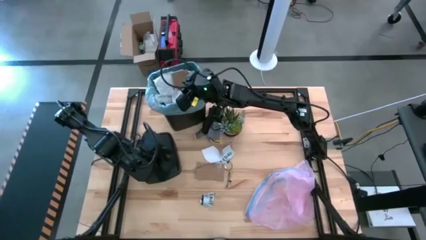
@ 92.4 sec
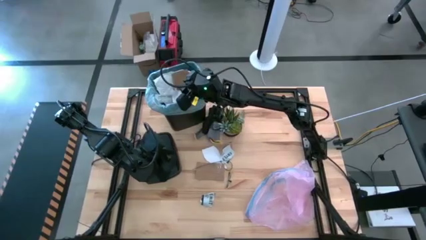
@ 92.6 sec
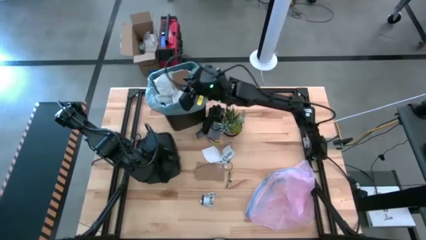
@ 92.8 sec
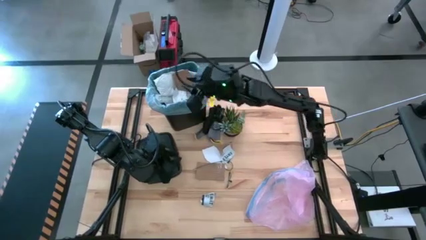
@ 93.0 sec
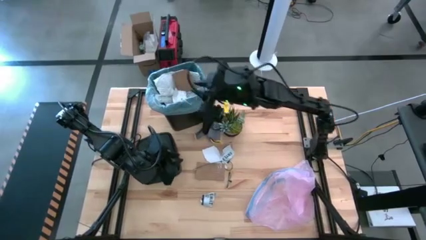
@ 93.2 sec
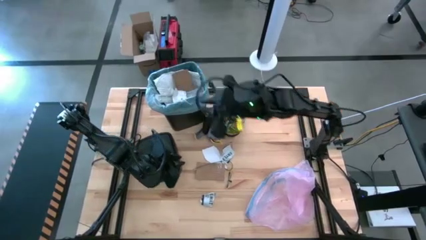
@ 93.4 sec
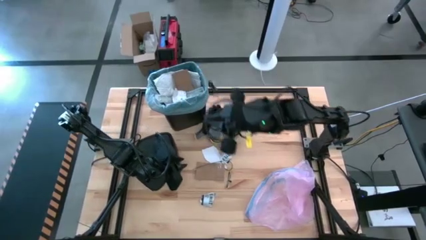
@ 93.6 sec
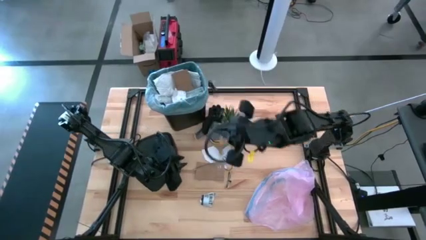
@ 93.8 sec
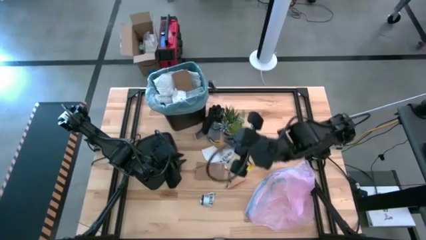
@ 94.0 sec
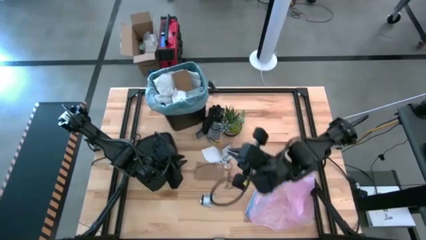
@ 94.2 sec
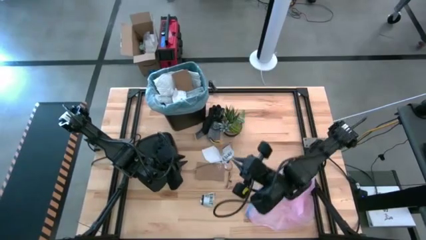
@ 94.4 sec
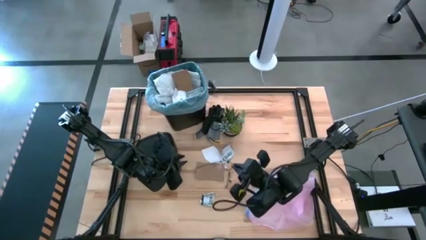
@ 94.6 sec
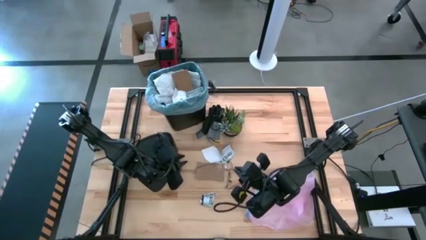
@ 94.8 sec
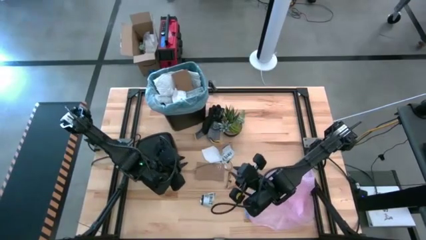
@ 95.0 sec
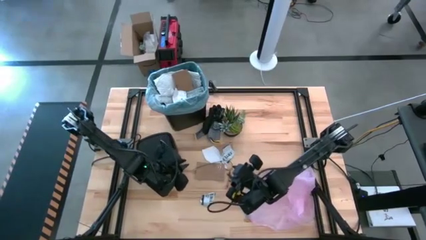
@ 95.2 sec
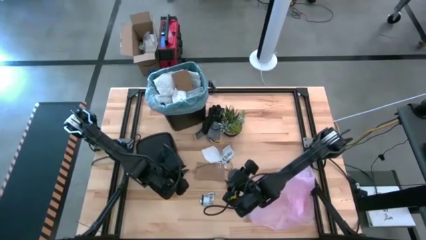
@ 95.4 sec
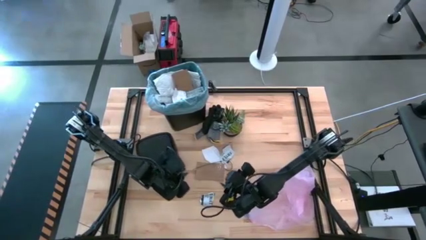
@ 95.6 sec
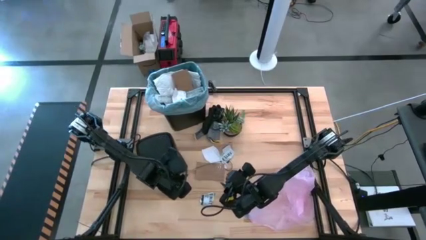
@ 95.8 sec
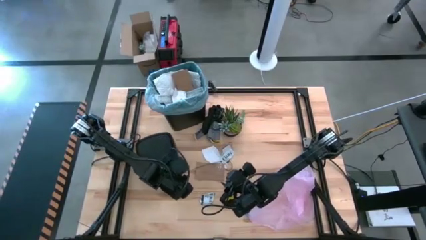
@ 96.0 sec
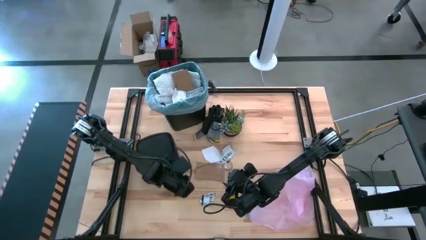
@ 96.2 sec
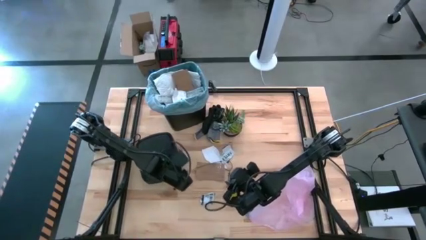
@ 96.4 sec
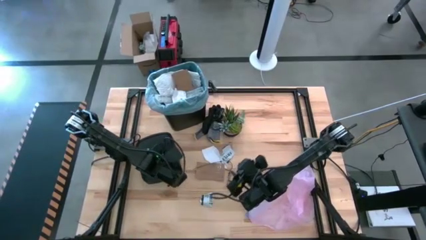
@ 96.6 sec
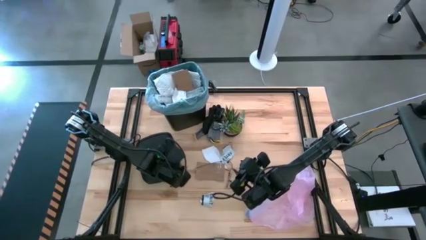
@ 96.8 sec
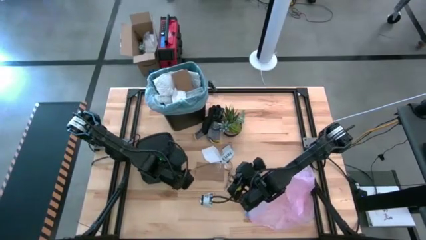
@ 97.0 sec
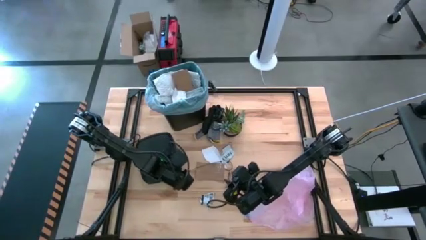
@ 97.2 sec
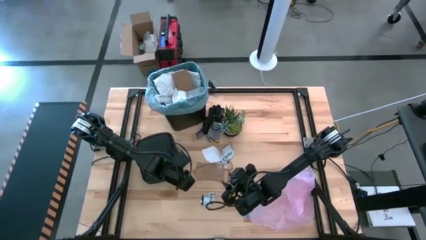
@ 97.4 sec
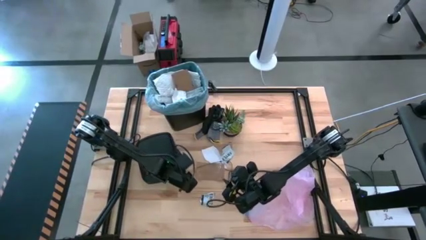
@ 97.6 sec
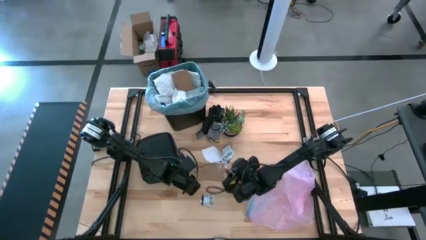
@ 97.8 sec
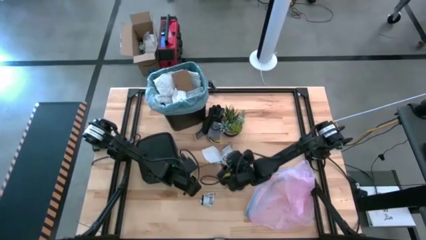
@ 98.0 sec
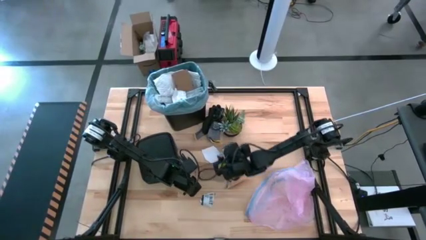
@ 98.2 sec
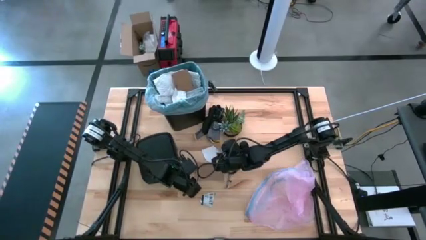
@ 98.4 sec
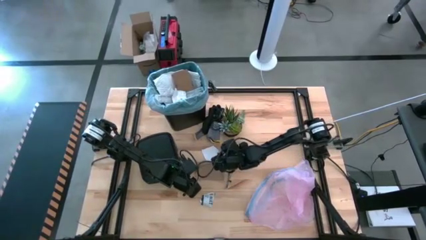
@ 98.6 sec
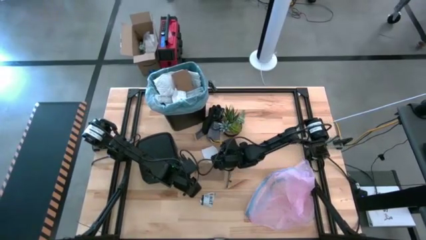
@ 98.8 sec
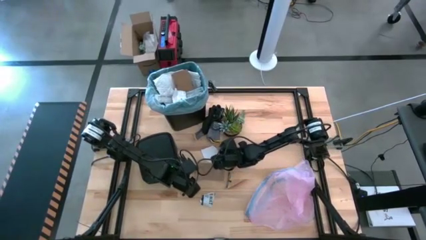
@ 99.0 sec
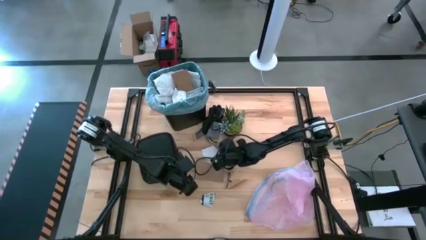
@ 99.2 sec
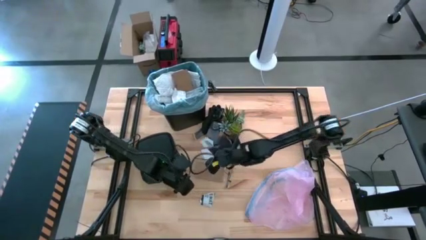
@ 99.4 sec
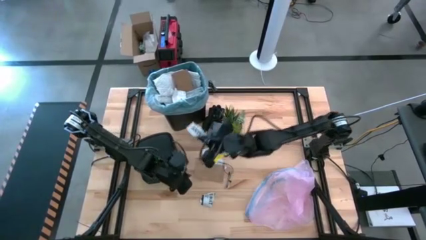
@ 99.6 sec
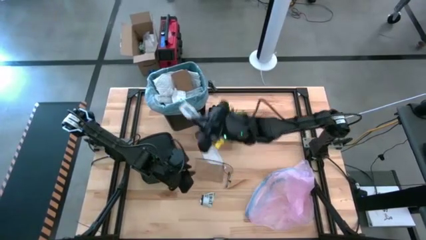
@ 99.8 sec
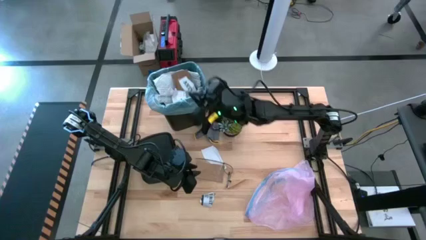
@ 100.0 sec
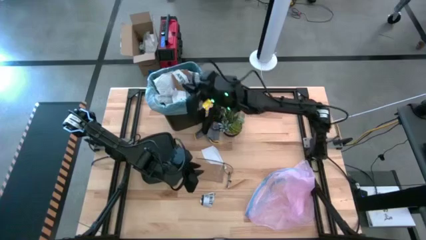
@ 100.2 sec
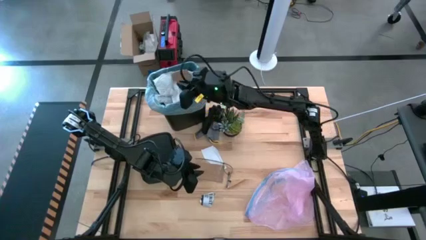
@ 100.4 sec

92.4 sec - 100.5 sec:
Task: place trash/remove bag and relplace
Put the white paper into the trash bin

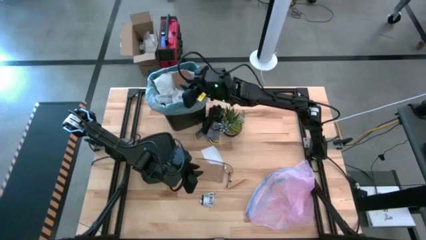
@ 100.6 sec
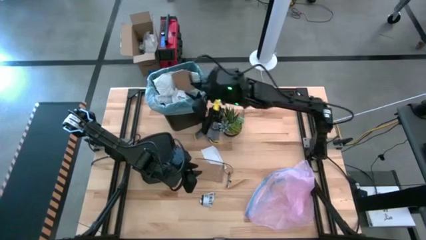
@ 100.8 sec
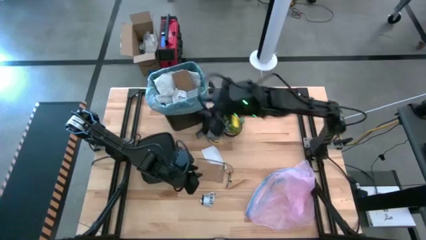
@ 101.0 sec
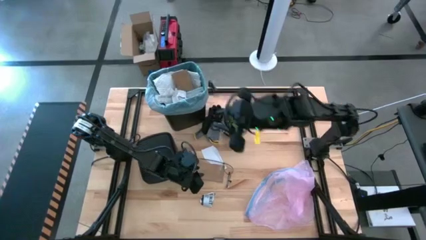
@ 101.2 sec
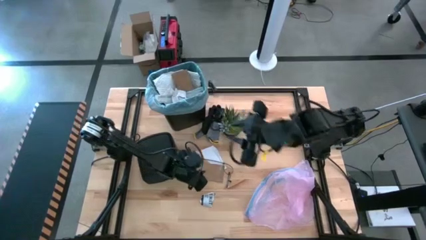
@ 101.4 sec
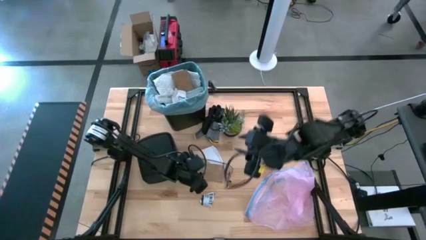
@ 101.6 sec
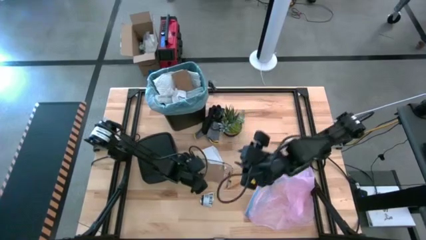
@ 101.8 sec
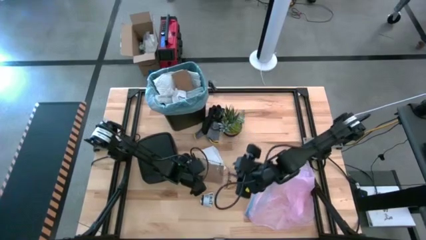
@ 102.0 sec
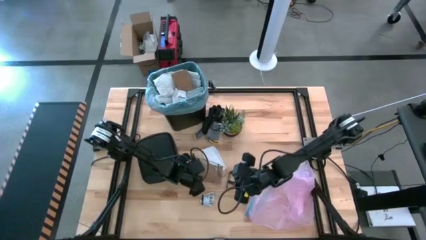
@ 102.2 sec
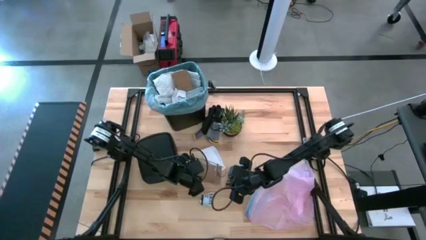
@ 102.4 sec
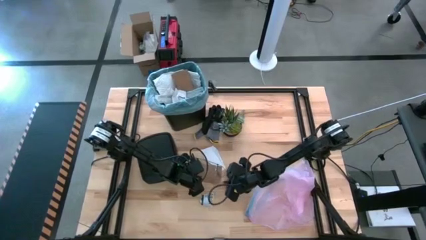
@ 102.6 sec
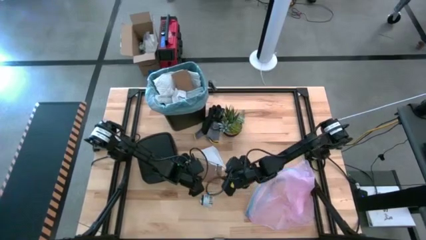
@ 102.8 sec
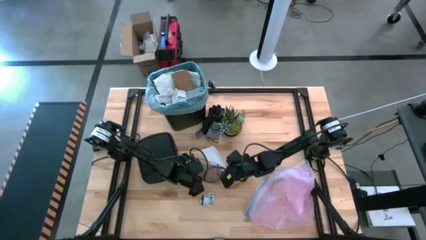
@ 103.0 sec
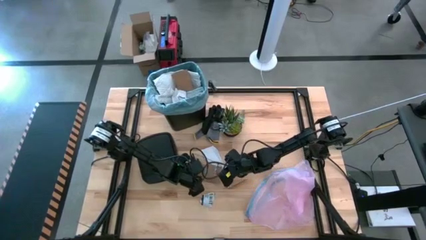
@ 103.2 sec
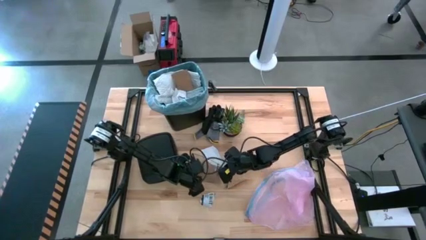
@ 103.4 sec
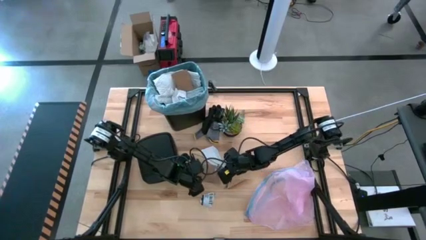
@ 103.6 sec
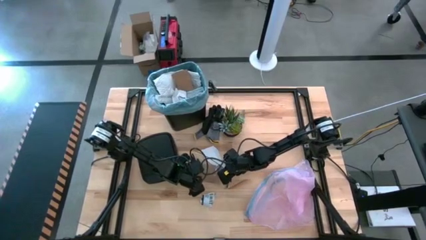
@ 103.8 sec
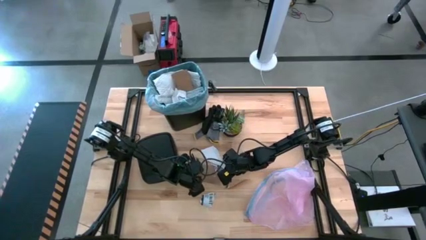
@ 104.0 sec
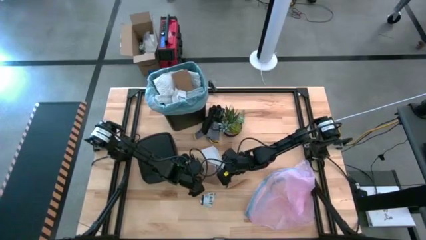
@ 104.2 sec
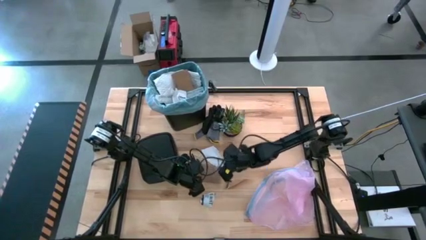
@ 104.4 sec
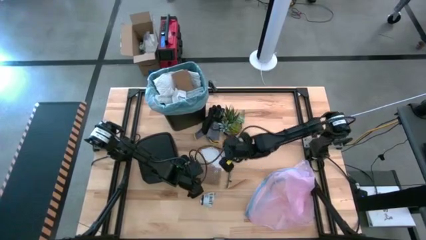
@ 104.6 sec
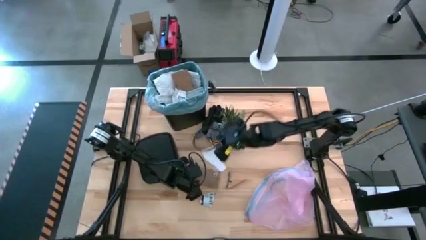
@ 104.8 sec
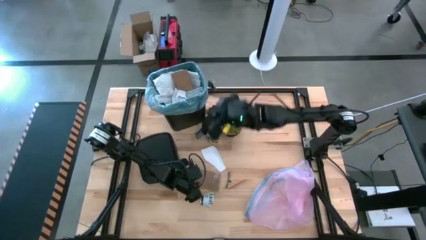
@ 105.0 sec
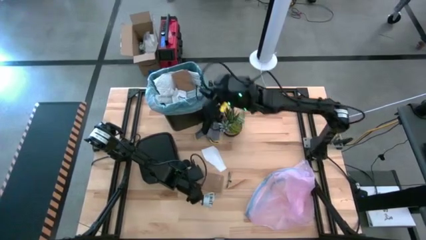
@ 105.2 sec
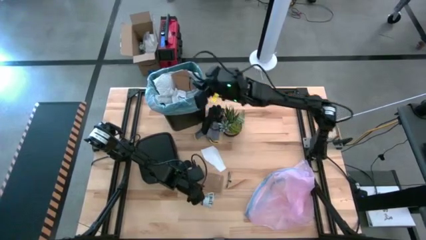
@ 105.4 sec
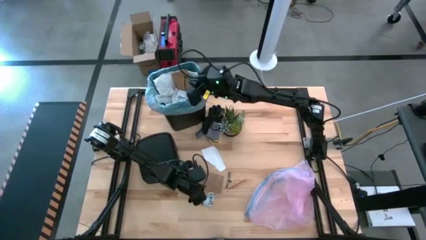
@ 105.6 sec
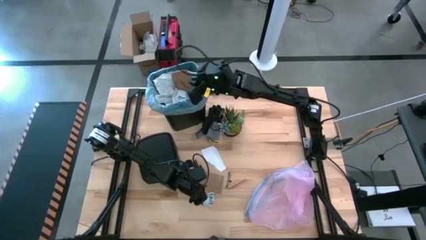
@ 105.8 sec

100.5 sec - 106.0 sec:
Put the black zip tie into the trash bin

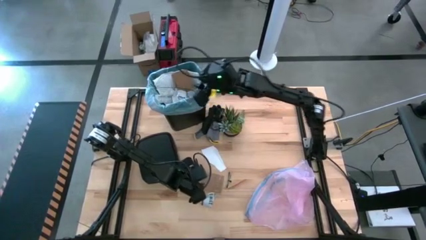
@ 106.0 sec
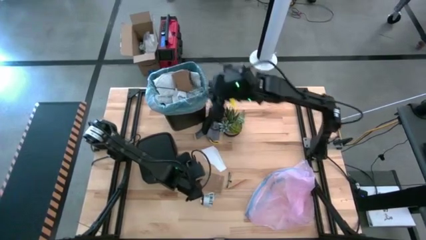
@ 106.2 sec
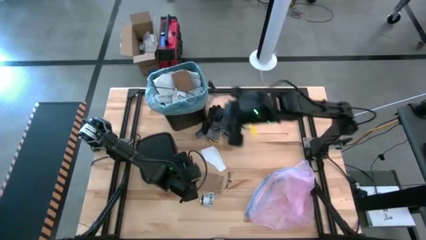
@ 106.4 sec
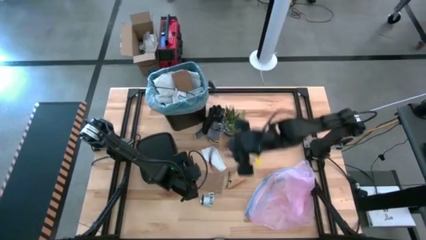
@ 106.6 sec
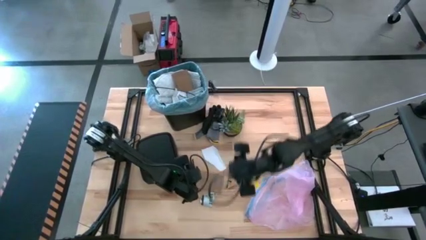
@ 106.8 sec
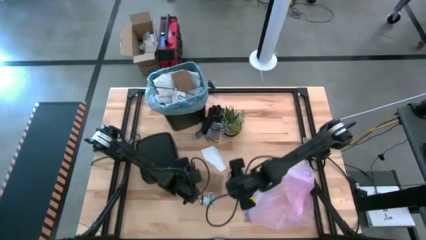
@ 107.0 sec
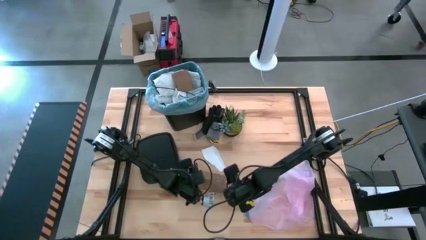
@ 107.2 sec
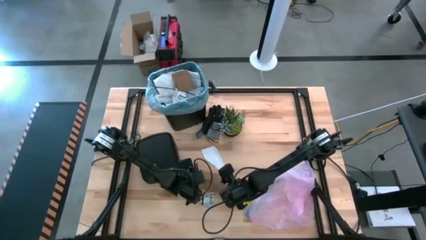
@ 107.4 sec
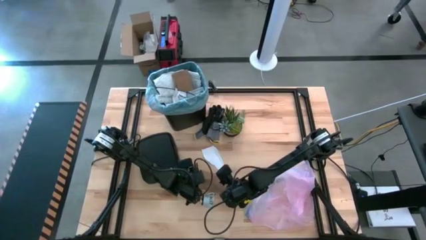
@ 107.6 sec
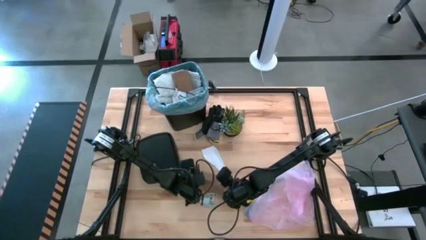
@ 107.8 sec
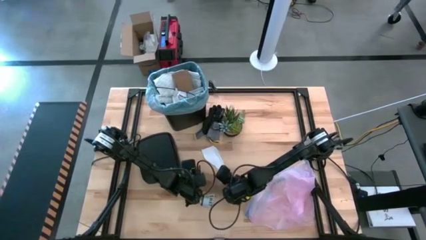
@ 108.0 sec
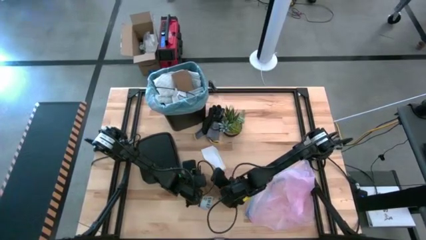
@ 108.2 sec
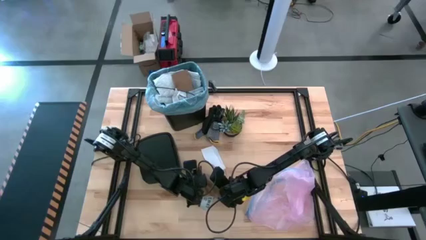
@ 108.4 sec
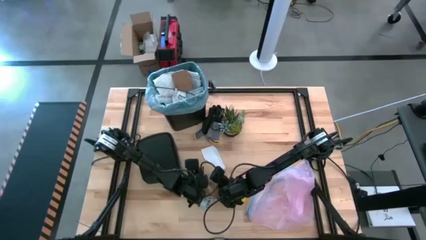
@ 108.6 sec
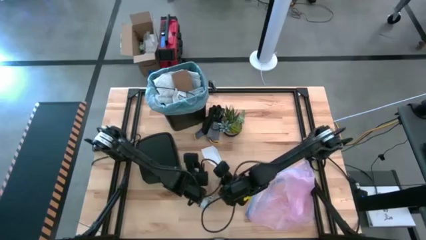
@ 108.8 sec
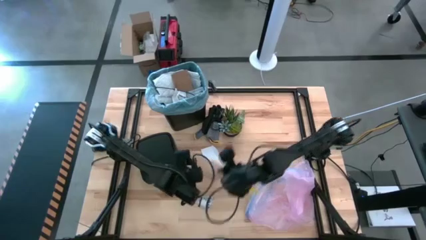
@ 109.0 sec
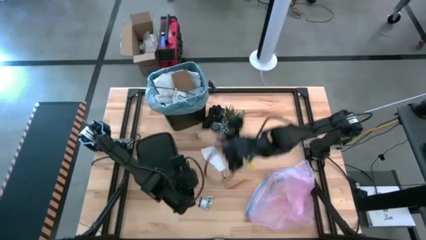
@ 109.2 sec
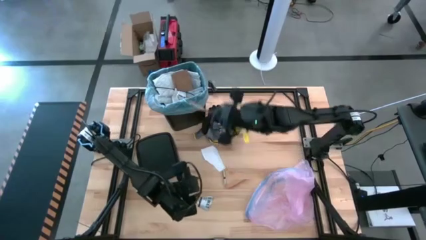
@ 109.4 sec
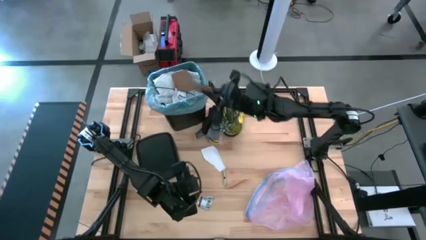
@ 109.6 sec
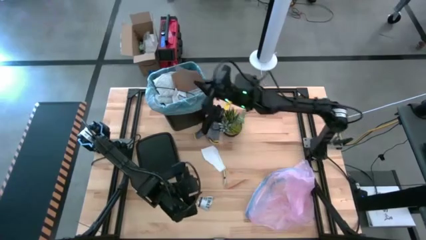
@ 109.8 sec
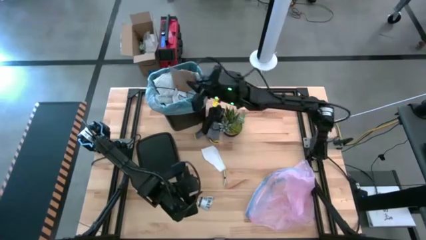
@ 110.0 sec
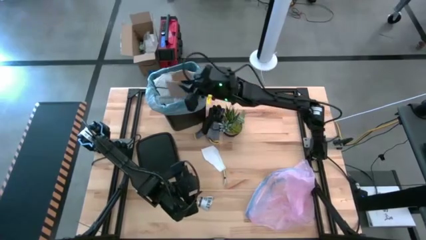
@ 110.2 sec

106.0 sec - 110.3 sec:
Put the brown cardboard into the trash bin
